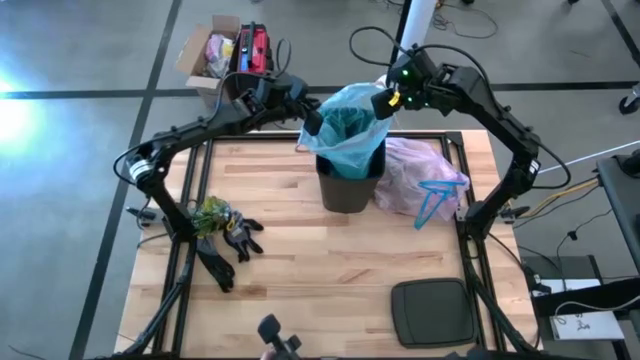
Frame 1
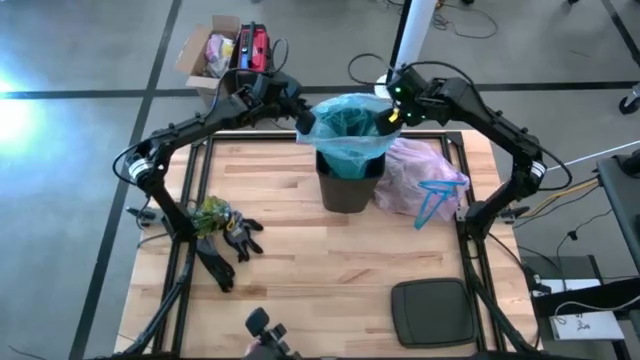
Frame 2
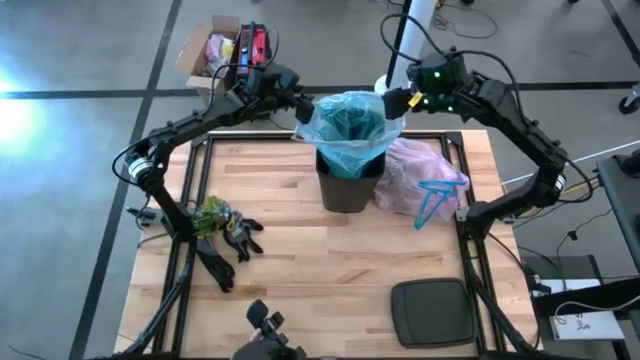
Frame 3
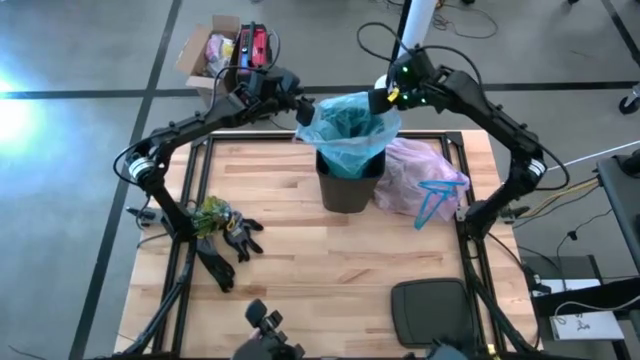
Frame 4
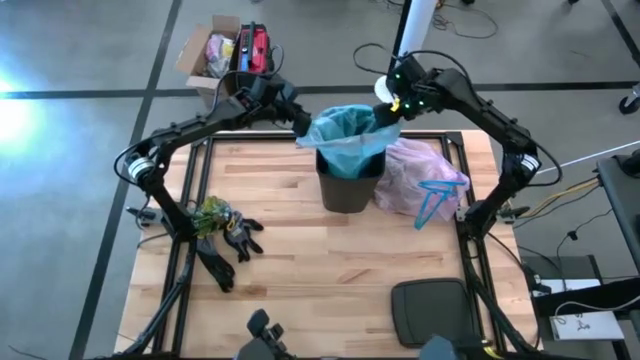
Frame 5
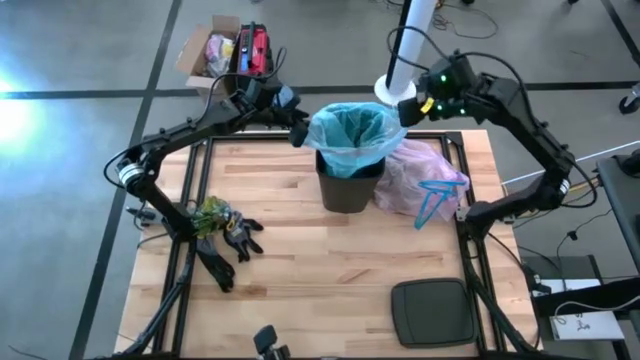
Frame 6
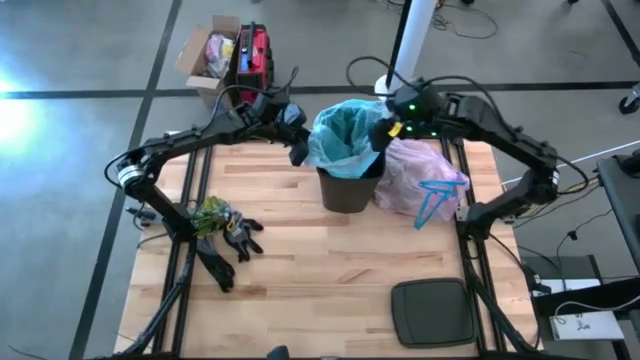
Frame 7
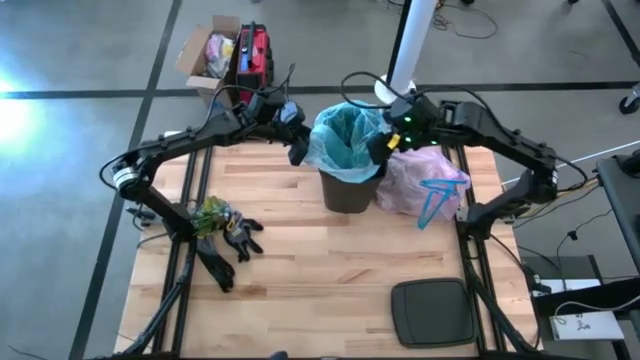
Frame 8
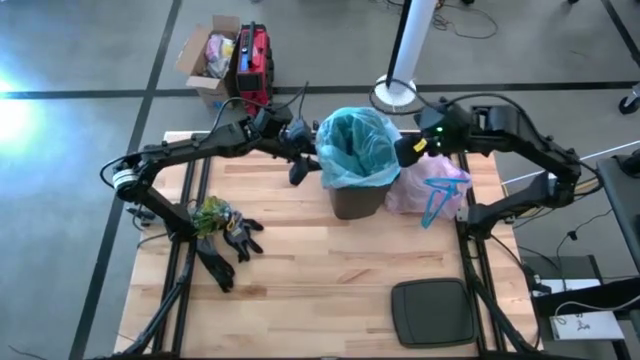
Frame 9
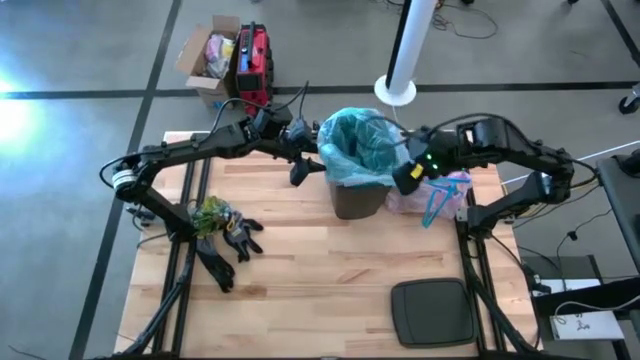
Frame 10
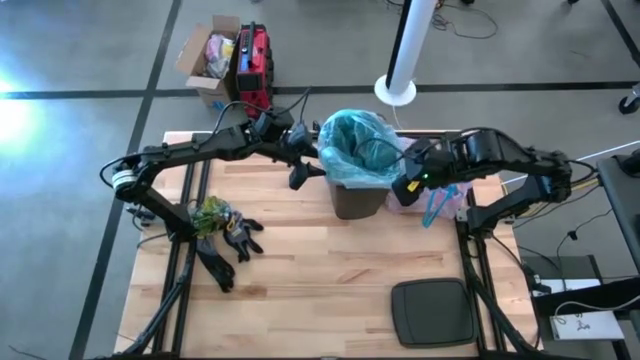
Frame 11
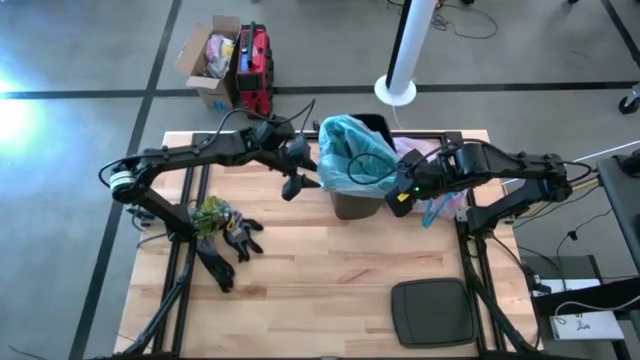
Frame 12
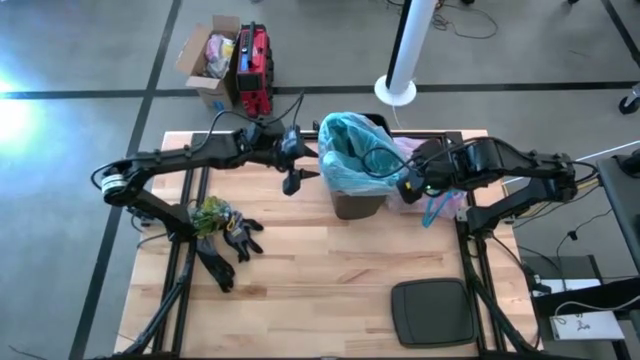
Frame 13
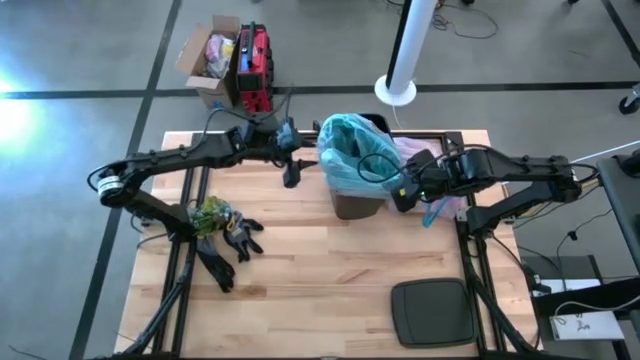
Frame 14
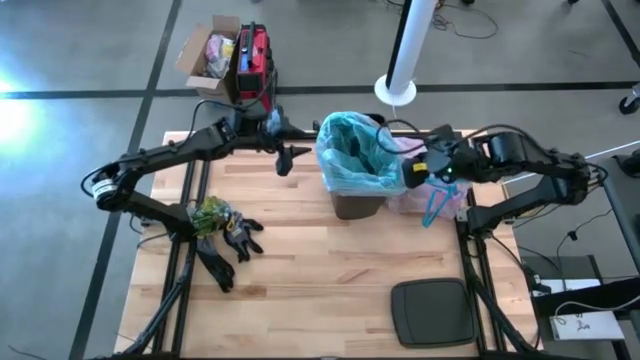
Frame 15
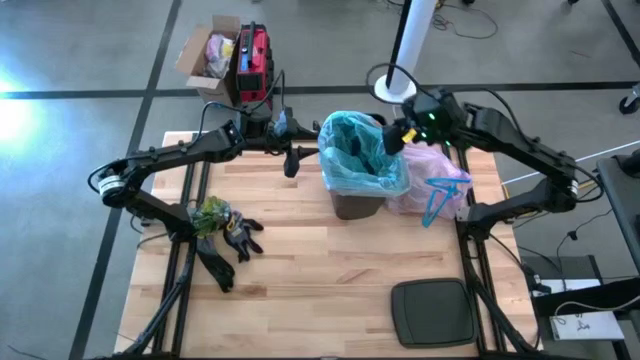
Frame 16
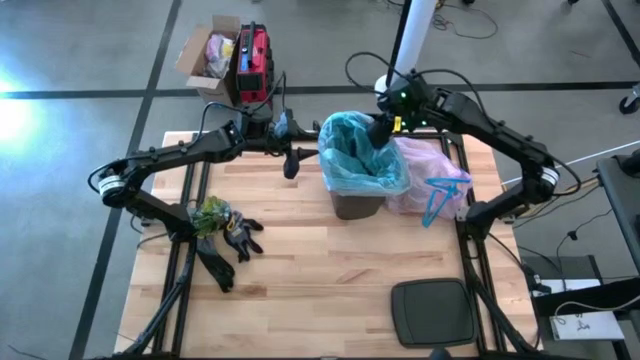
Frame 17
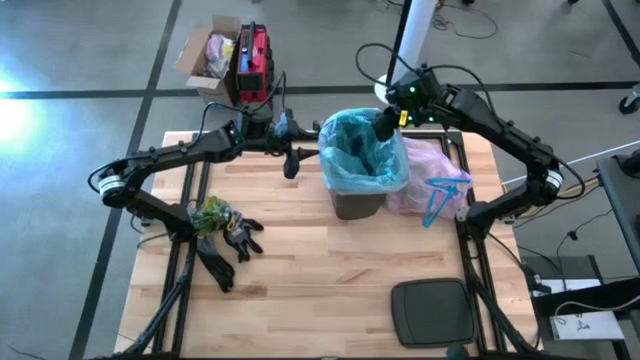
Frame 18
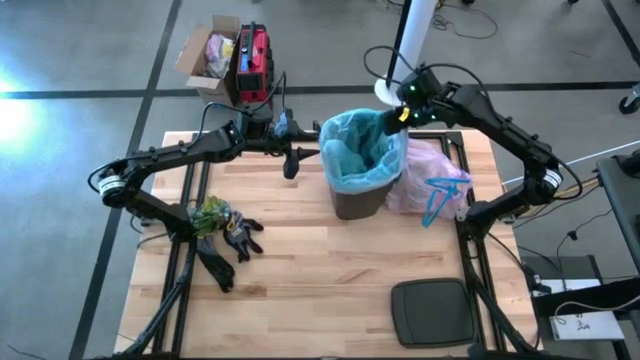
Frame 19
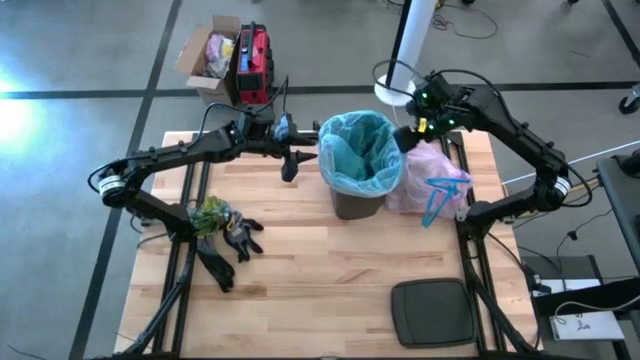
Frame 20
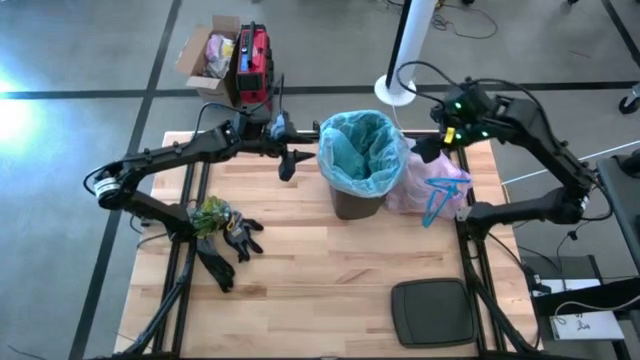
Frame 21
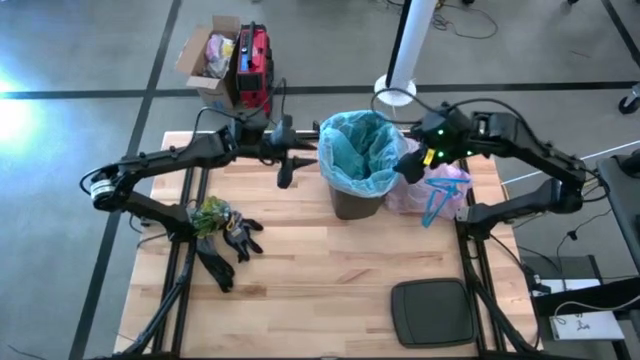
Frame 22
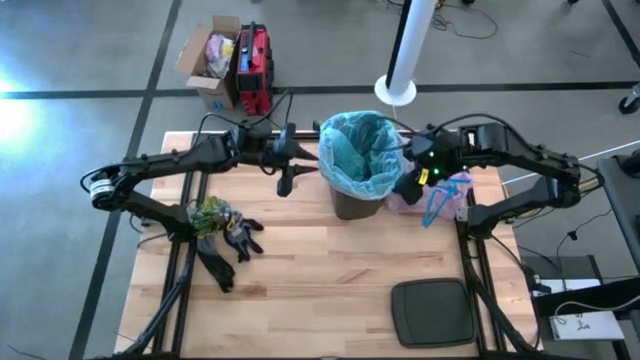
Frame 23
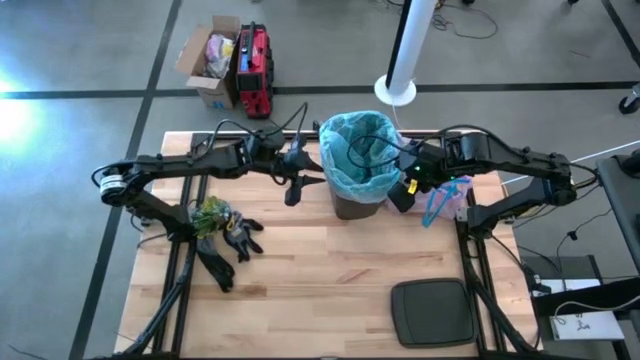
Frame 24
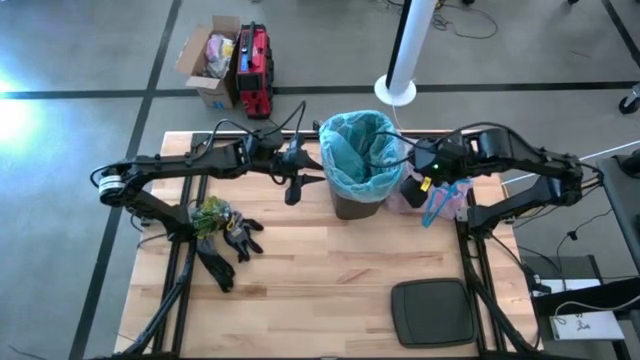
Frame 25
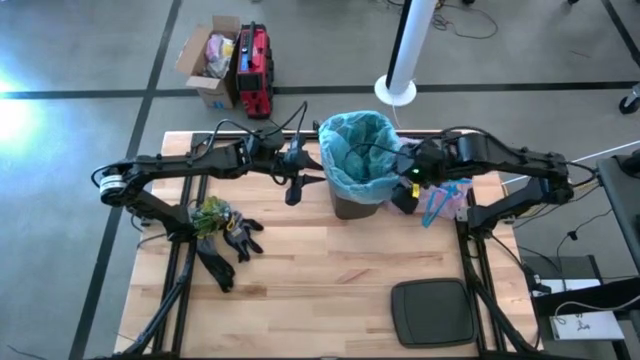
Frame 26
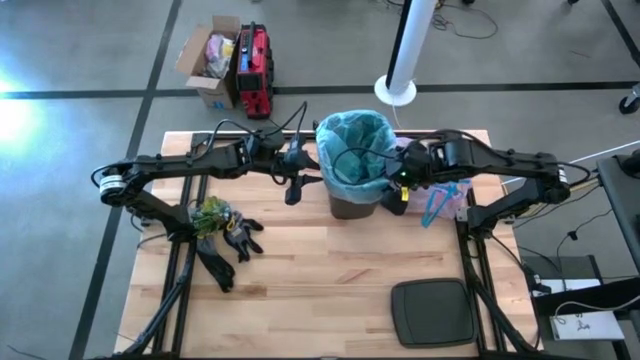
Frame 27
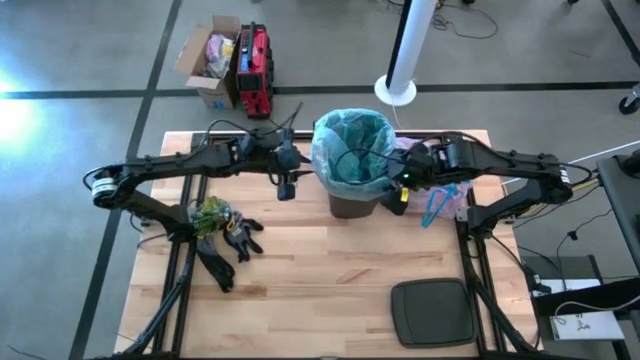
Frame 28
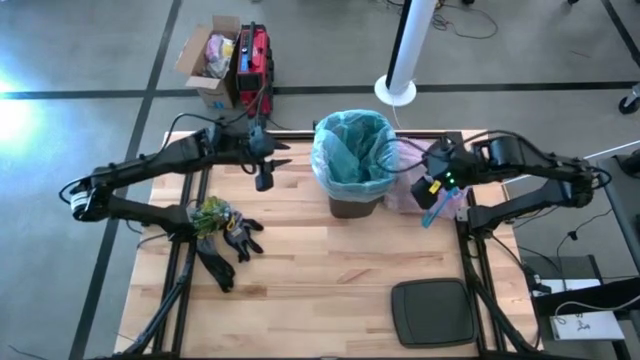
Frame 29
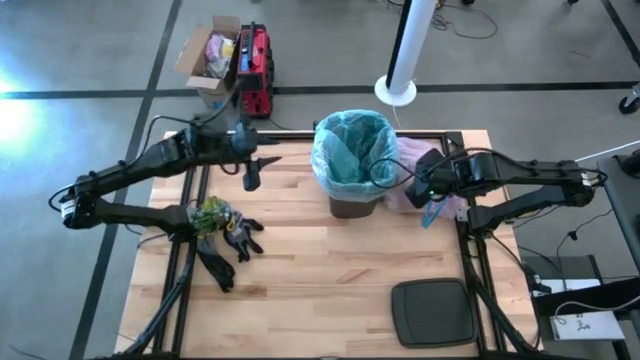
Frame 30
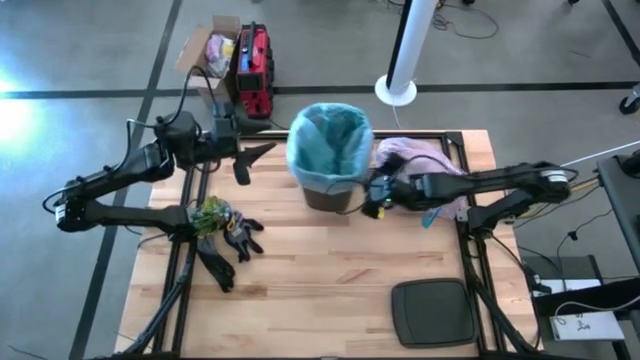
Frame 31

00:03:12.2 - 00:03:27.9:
Task: place trash/remove bag and relplace
Insert the new blue trash bag into the trash bin

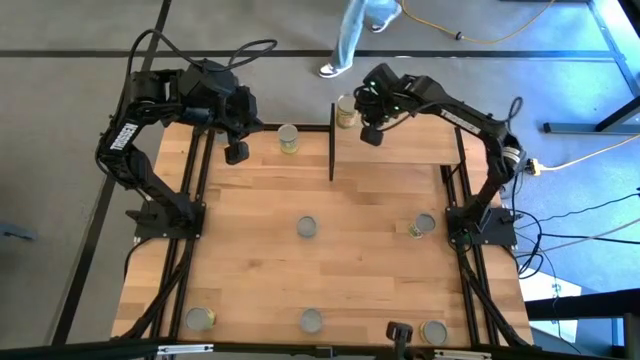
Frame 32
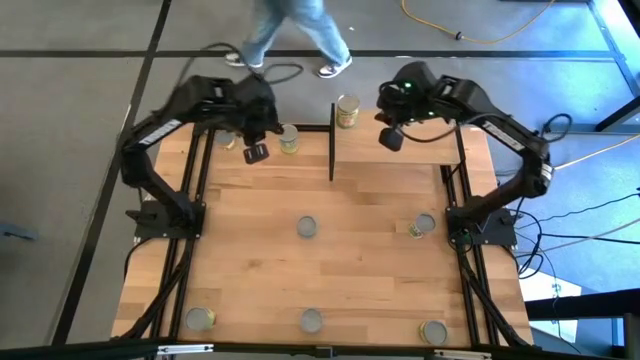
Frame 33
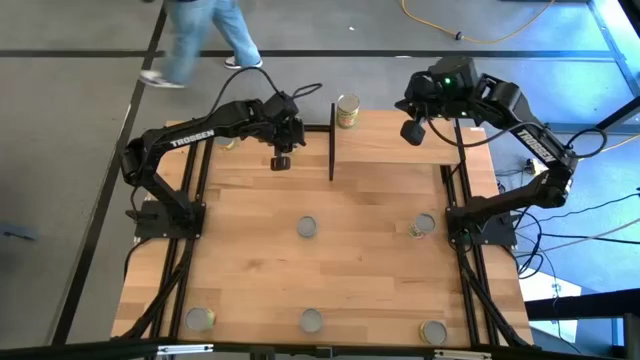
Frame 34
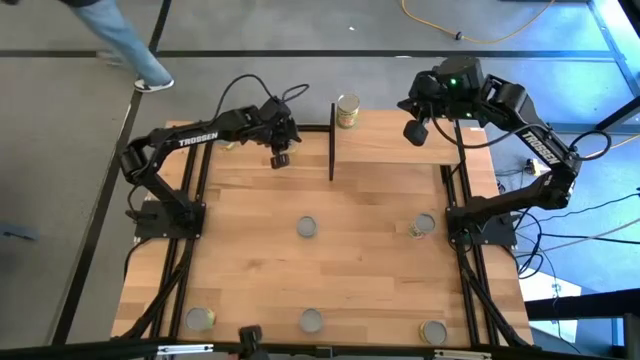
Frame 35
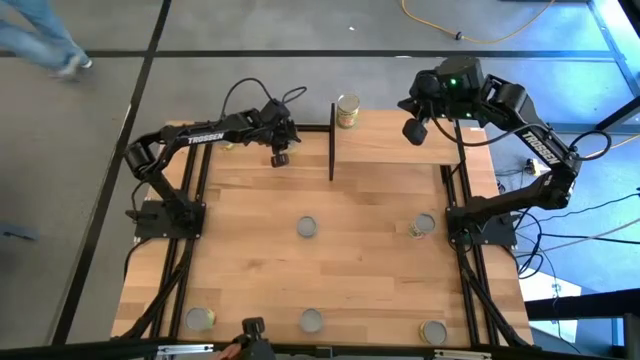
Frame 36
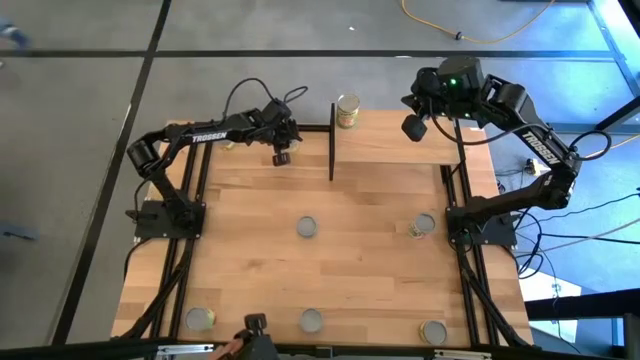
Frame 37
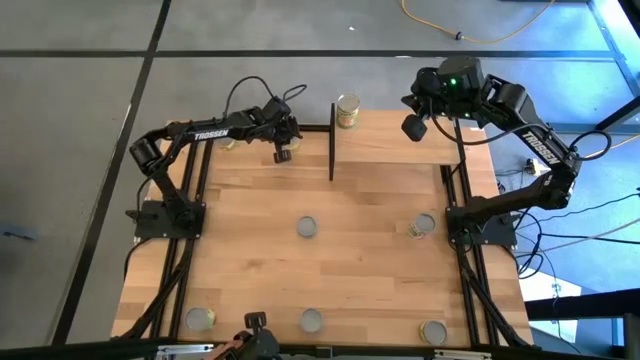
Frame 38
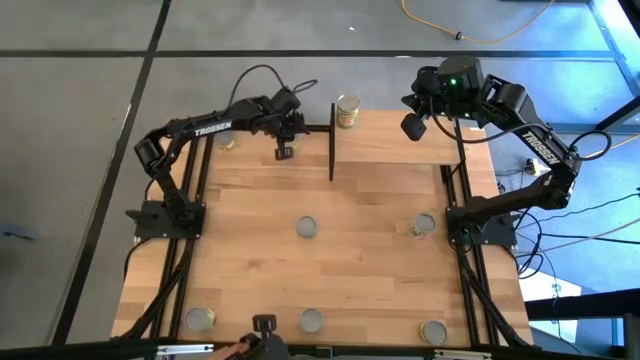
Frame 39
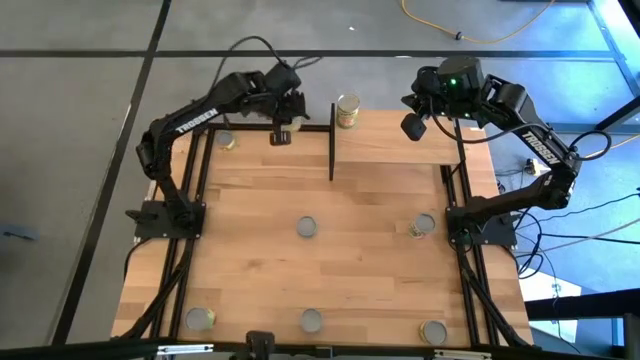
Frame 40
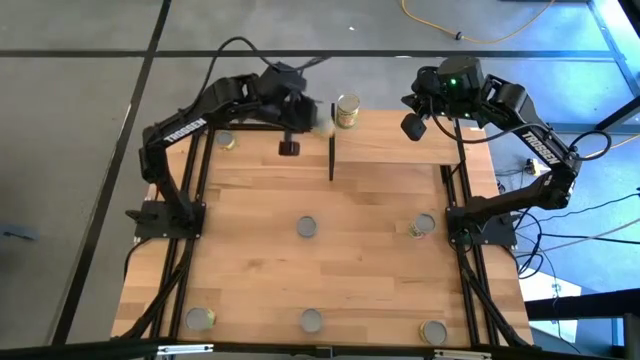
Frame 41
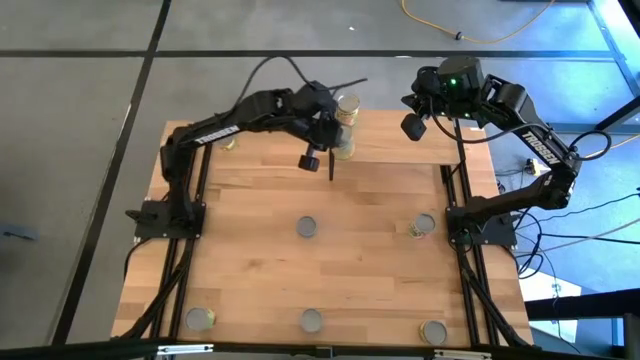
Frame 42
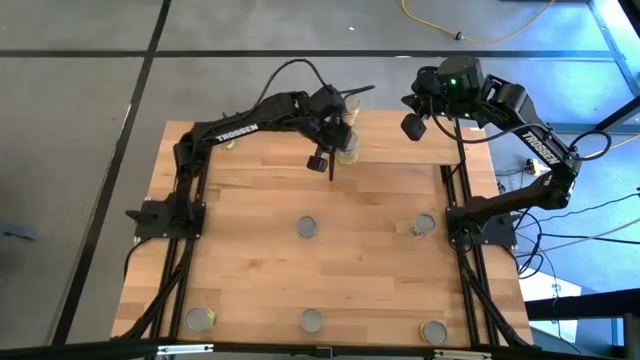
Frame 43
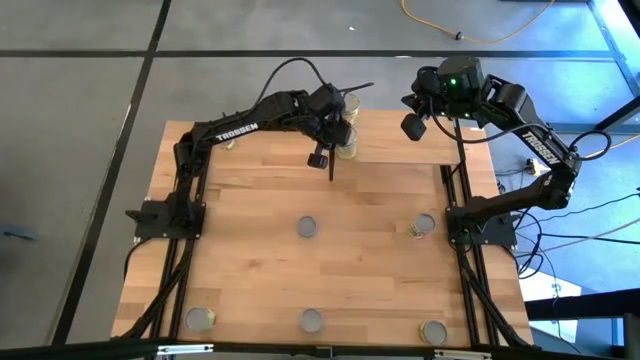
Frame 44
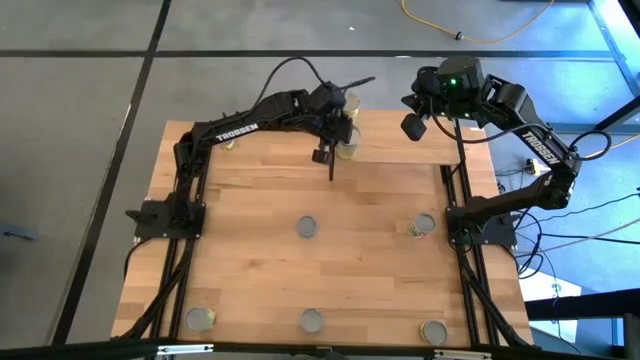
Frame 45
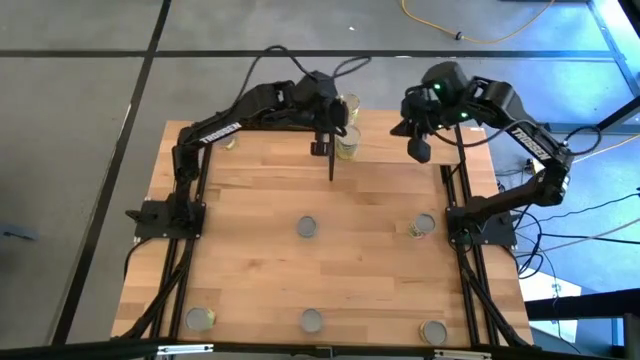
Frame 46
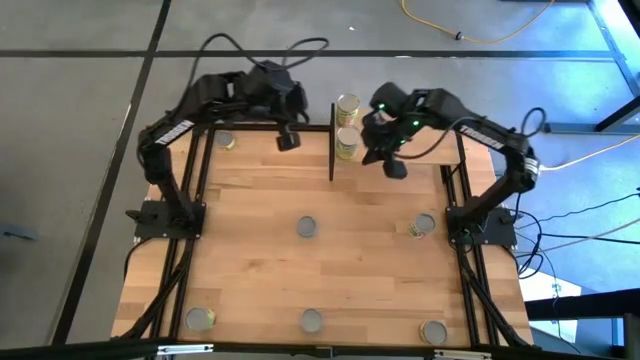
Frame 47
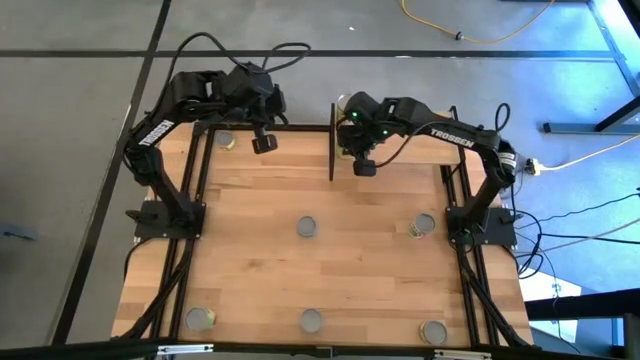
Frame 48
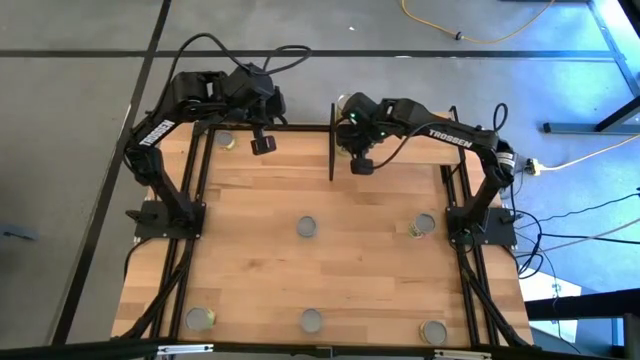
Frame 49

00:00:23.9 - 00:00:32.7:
Task: Pick and place cans onto a shelf
Put the blue and yellow can on the shelf
